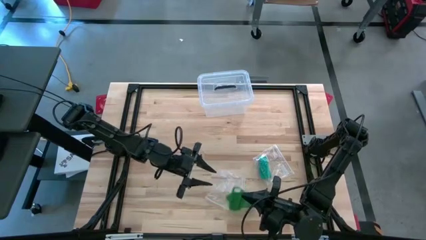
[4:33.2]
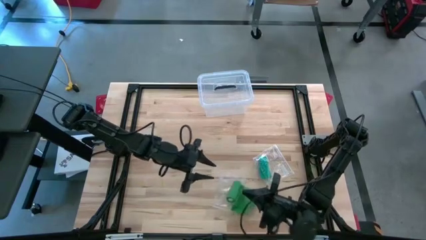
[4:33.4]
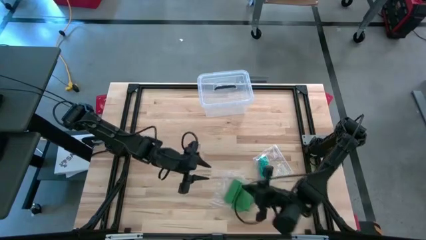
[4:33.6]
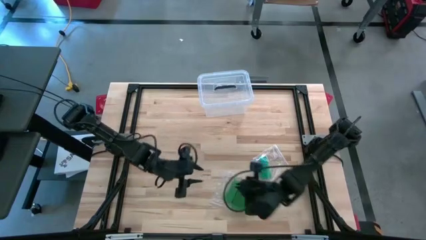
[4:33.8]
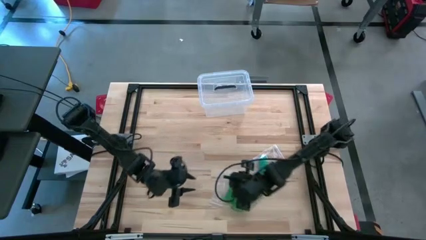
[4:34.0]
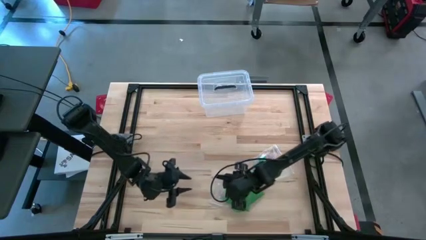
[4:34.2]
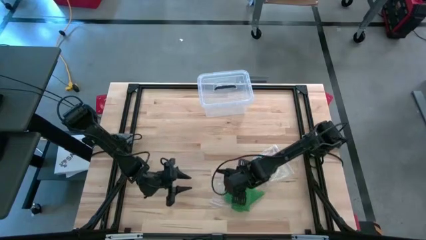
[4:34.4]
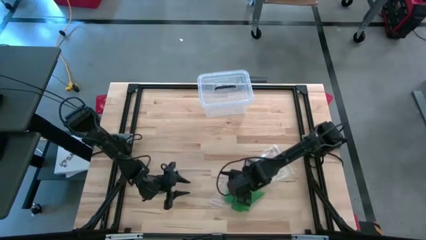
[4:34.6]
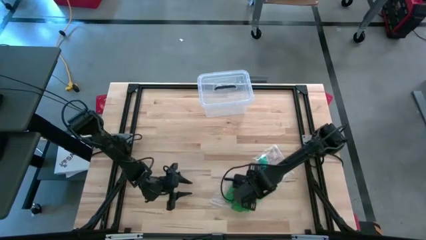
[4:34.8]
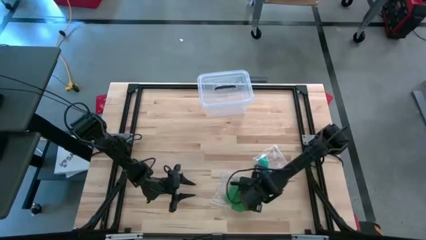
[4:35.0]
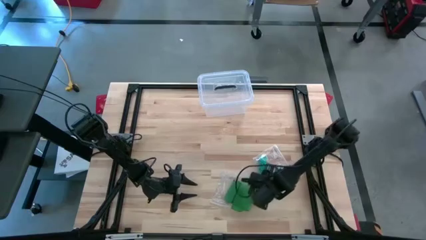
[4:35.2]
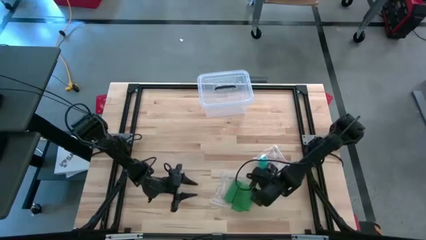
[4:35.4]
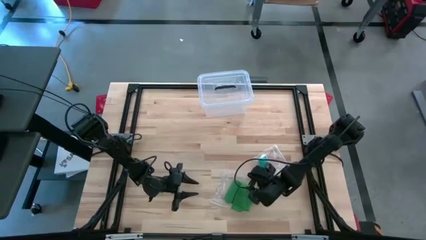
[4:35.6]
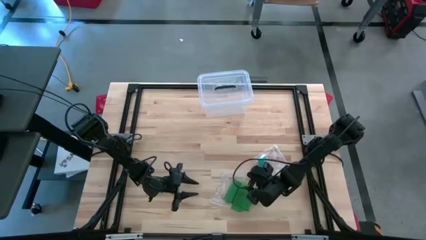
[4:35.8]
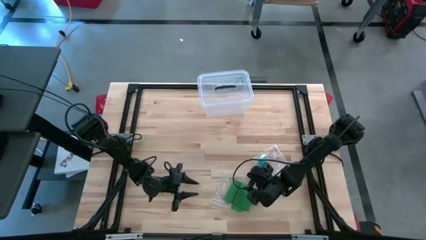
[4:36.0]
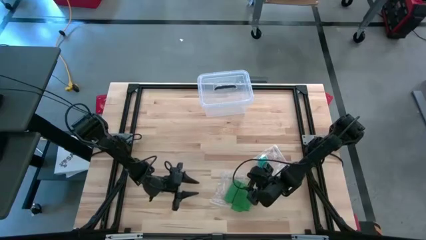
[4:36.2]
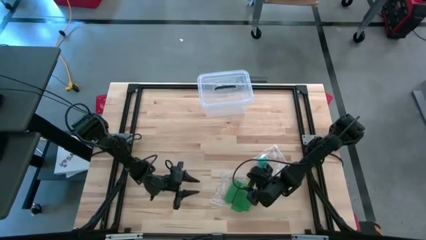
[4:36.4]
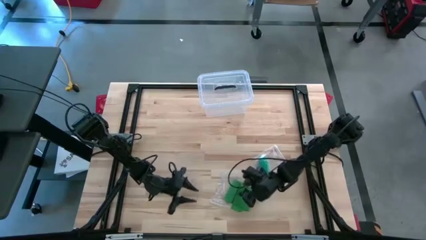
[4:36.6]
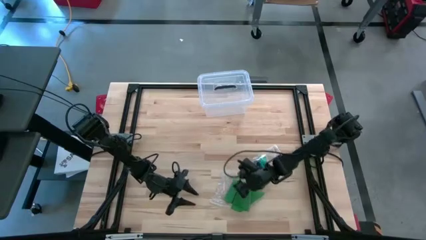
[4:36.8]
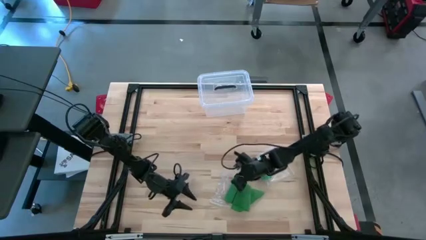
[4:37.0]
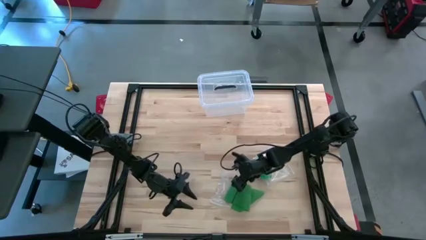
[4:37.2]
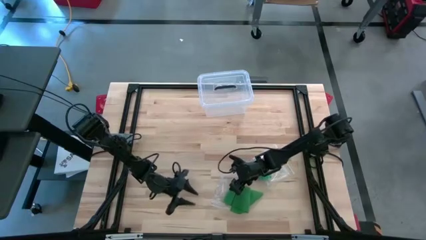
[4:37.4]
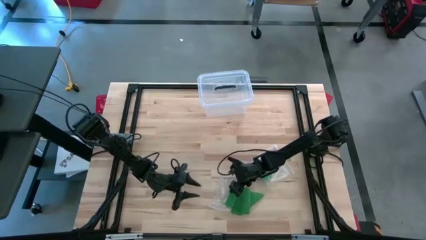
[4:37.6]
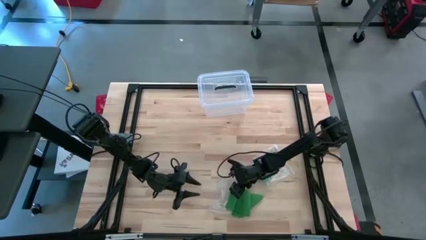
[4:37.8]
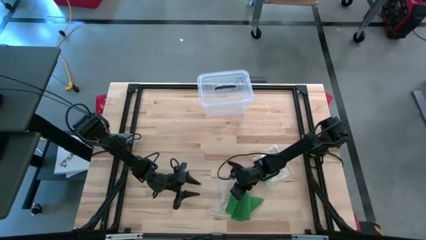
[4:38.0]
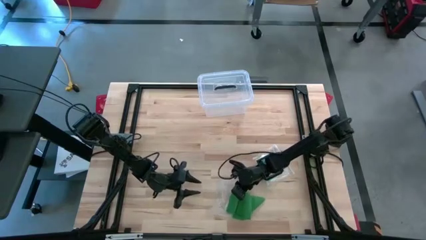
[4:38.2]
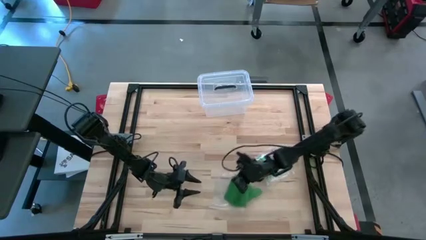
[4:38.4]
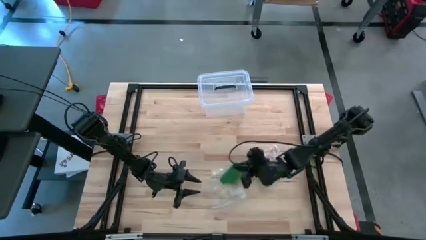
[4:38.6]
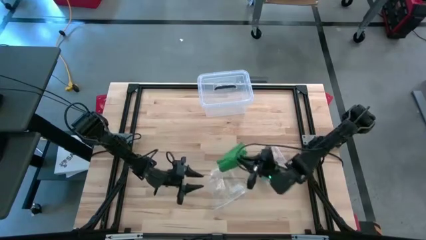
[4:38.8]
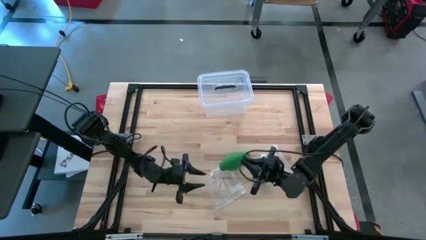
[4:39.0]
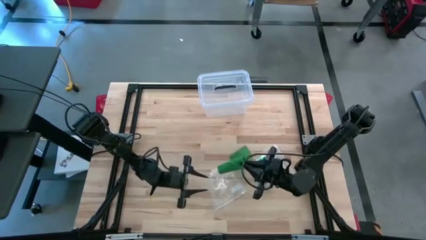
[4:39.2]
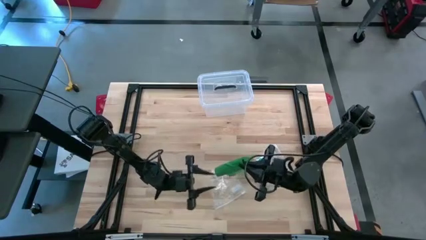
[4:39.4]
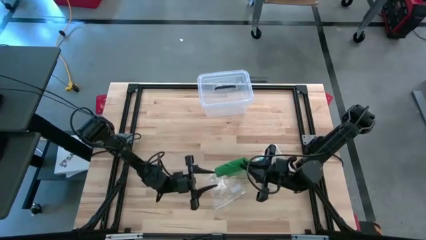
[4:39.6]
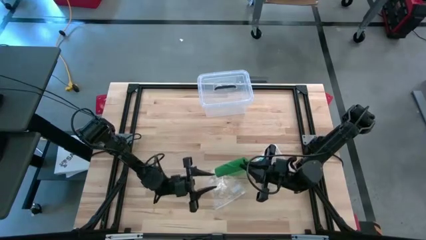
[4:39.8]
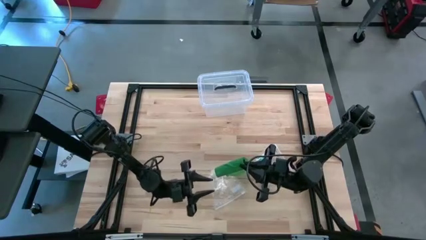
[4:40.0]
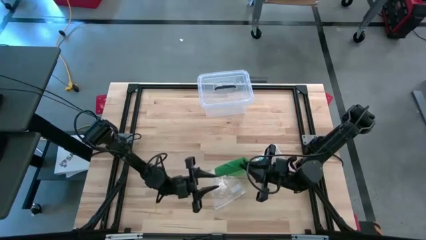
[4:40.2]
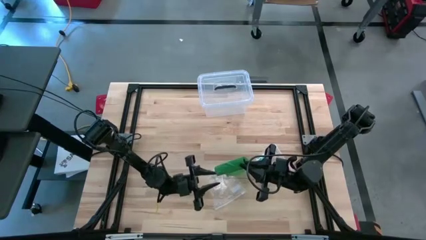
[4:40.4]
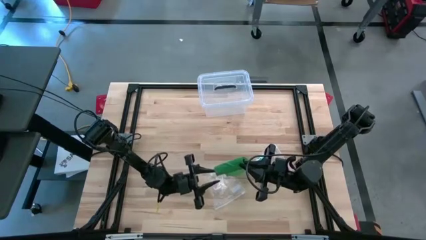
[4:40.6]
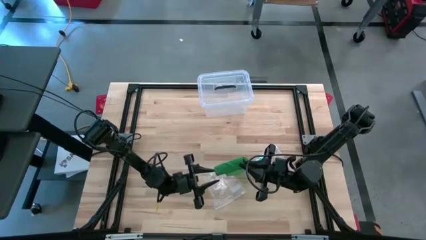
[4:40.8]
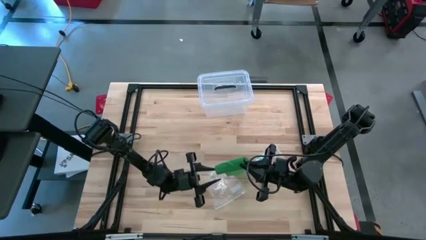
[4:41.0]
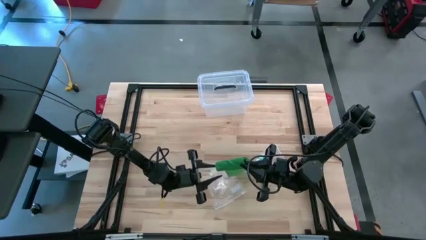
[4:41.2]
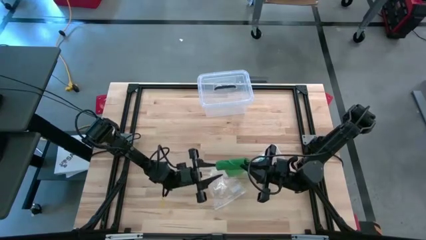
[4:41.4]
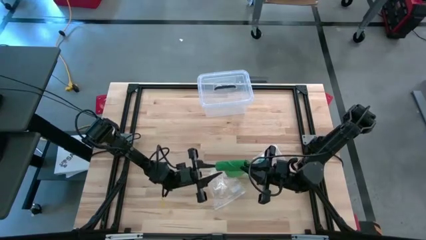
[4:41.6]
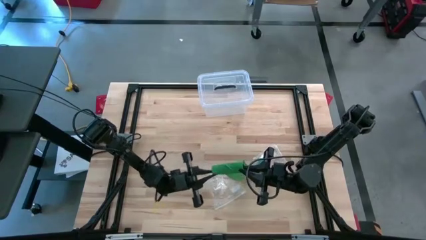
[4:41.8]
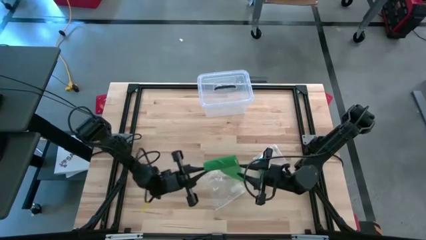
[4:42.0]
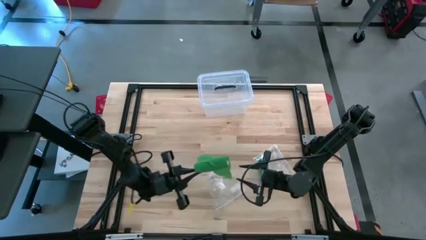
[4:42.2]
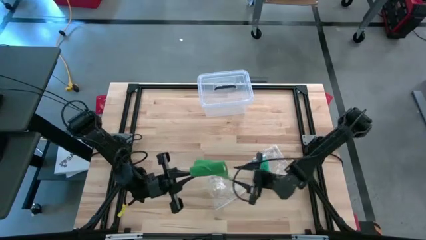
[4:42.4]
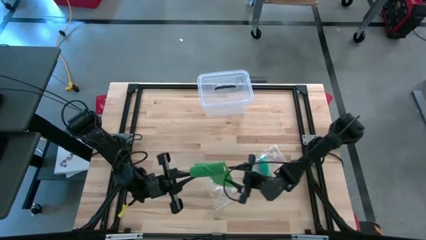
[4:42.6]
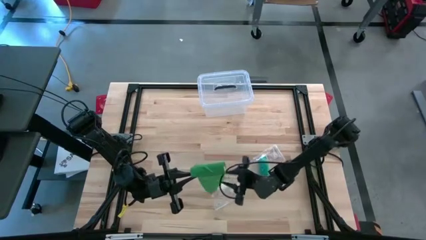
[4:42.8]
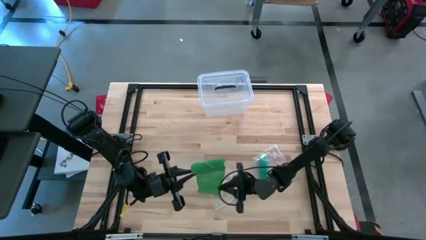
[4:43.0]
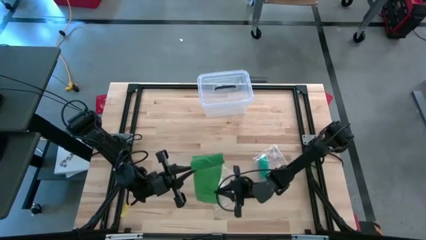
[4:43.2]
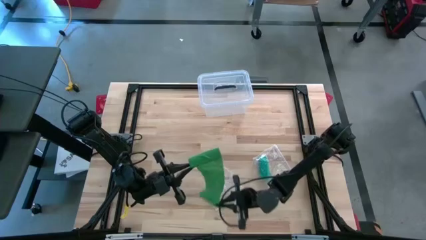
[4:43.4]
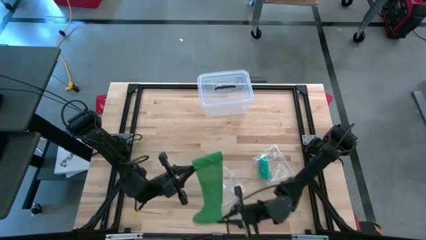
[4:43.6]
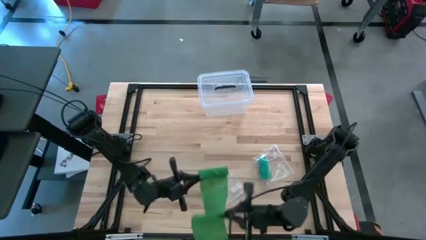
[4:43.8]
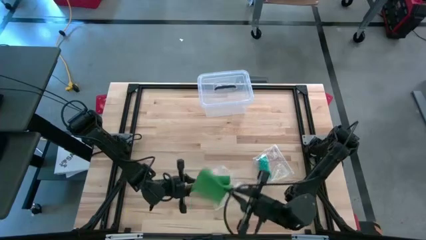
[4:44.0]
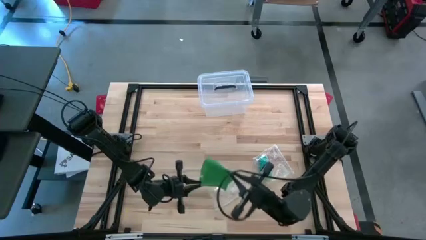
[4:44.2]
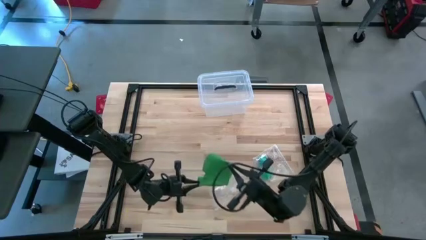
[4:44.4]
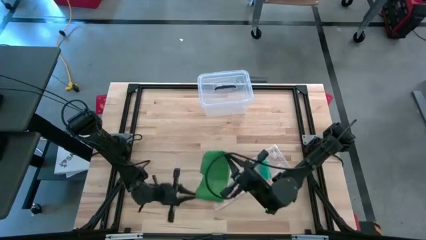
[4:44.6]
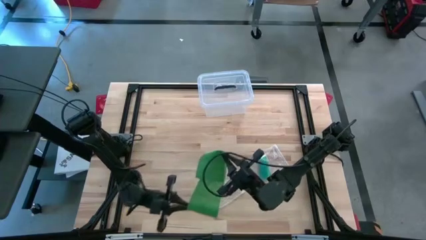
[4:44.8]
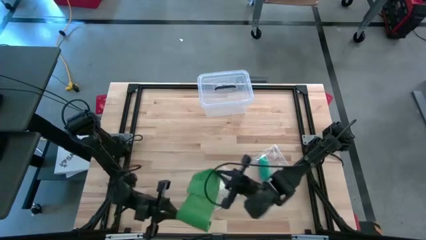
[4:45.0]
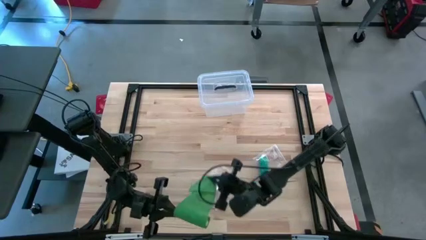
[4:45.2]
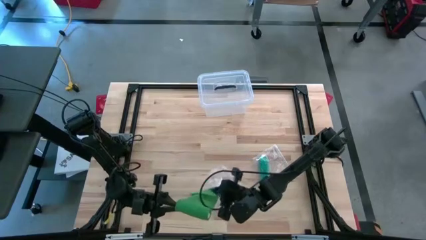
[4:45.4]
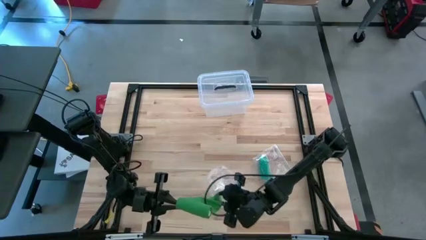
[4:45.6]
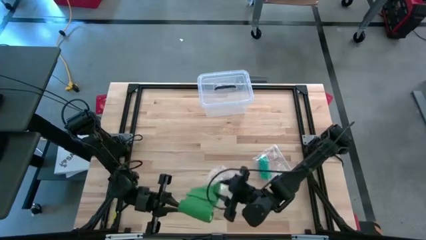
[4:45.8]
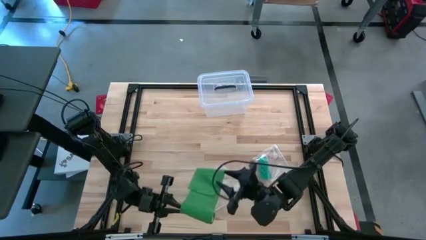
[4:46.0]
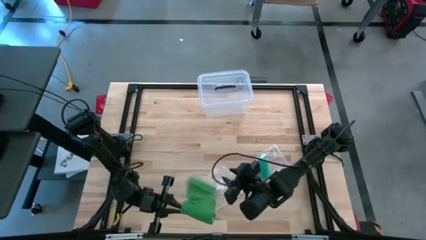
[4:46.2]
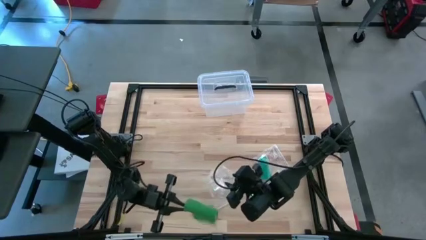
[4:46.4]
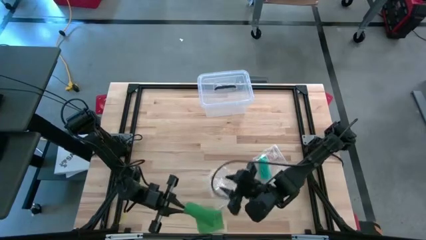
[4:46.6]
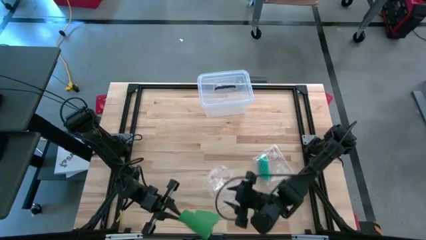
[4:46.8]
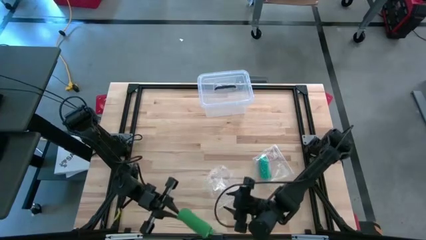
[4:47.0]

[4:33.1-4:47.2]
Task: Roll bandage
Roll the green bandage

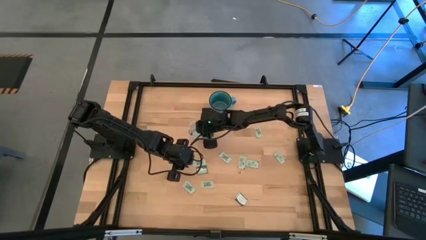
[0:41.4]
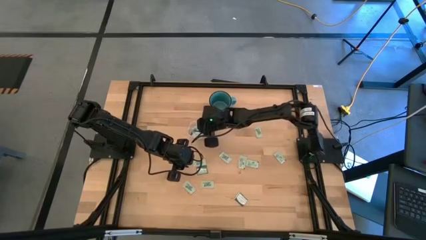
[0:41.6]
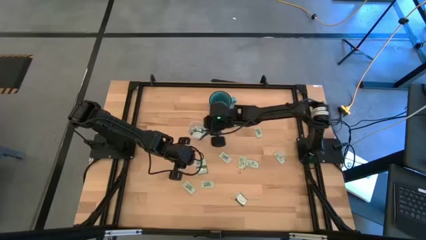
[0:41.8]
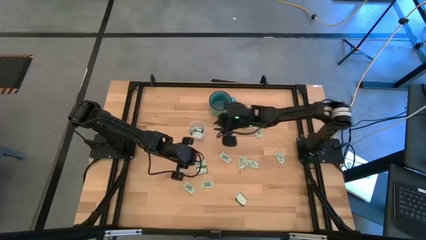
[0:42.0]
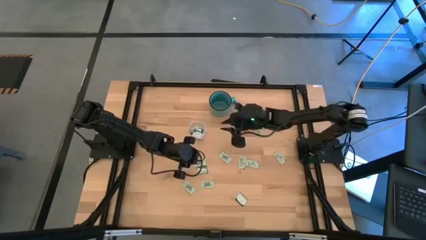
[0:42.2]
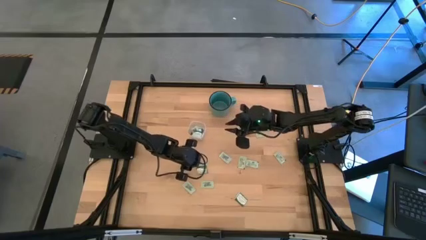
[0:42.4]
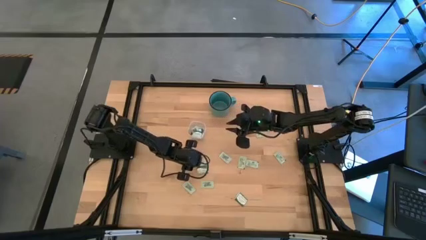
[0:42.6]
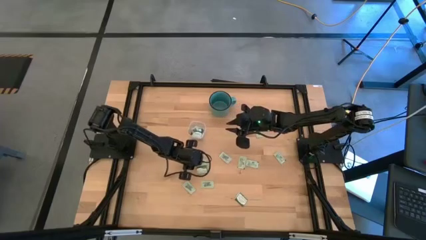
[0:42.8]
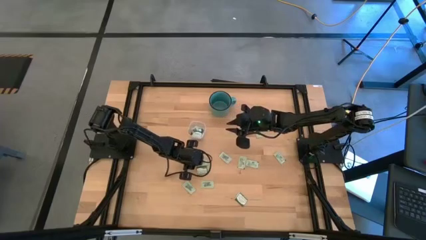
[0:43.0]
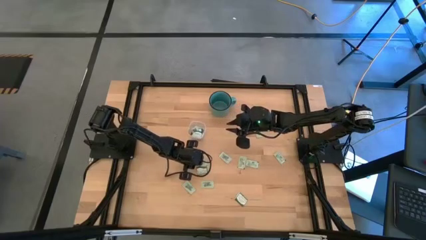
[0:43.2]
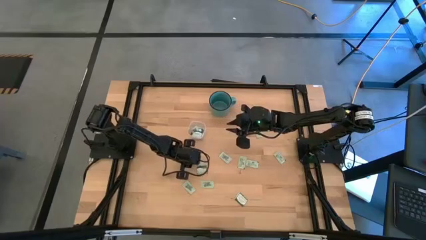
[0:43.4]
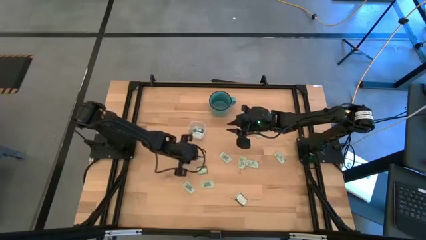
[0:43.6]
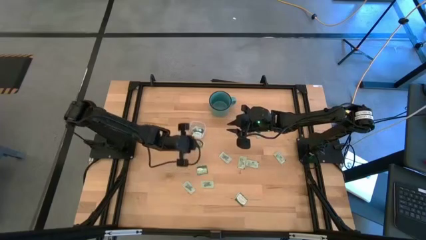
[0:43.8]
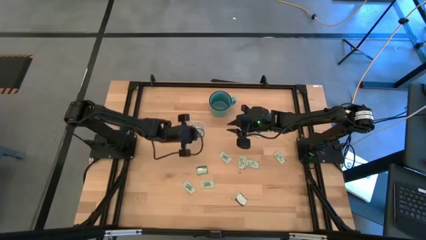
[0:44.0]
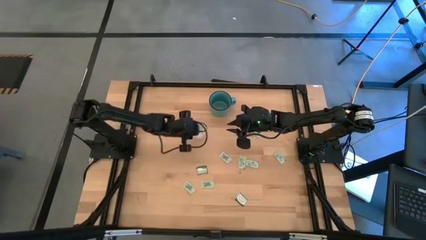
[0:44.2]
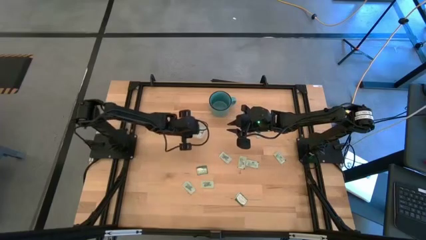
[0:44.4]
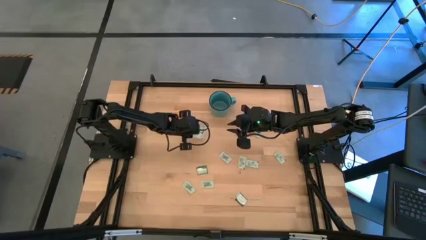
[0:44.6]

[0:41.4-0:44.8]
Task: Pick and place Stevia / Truvia into bins
Put the green stevia packet into the transparent container
